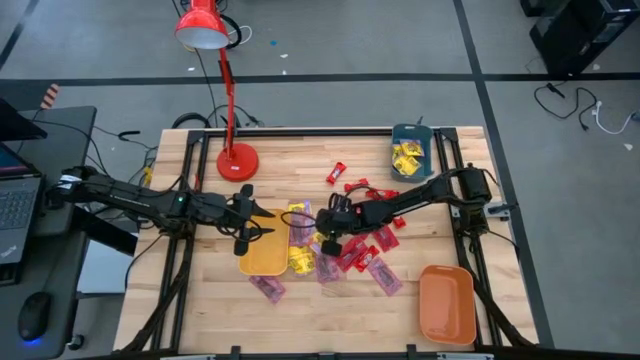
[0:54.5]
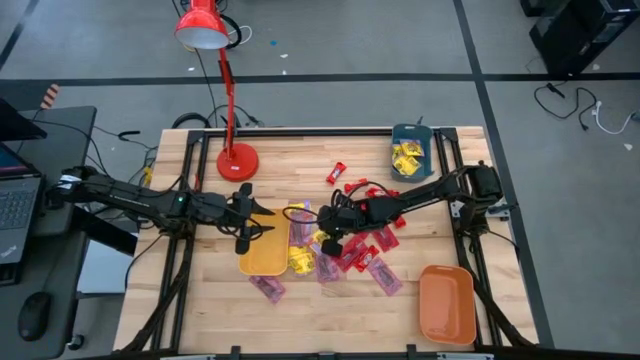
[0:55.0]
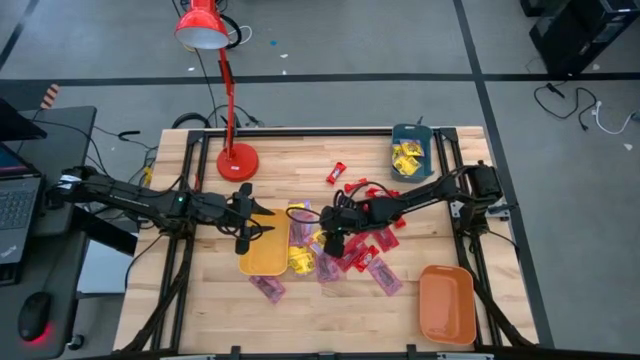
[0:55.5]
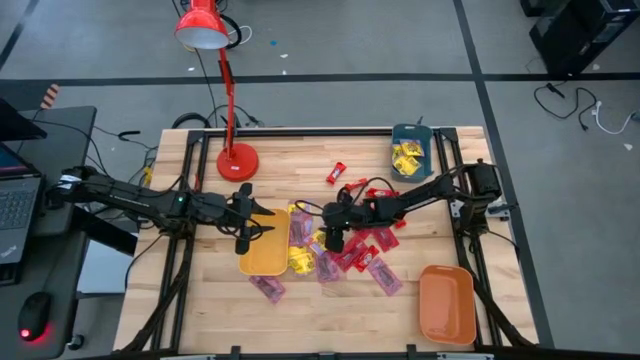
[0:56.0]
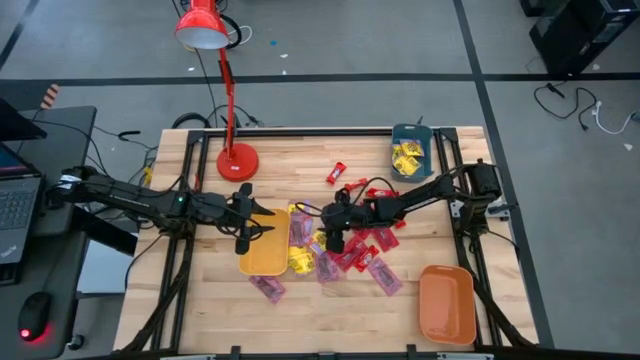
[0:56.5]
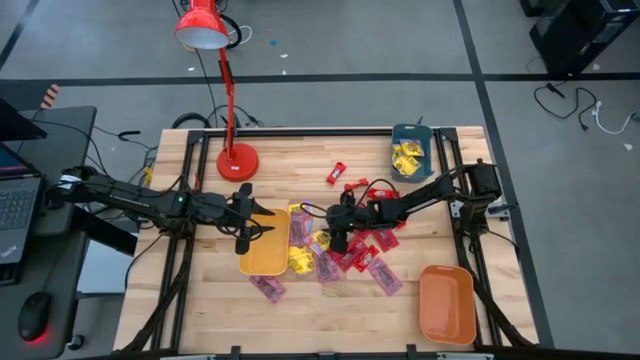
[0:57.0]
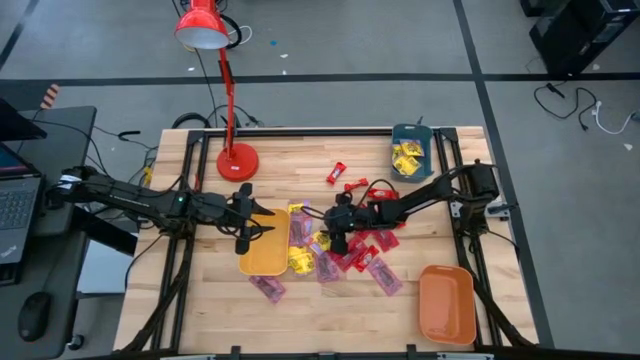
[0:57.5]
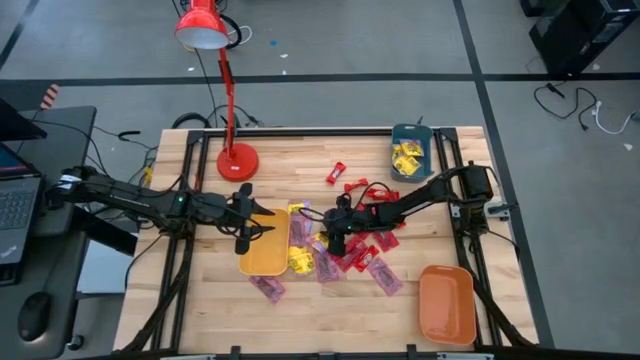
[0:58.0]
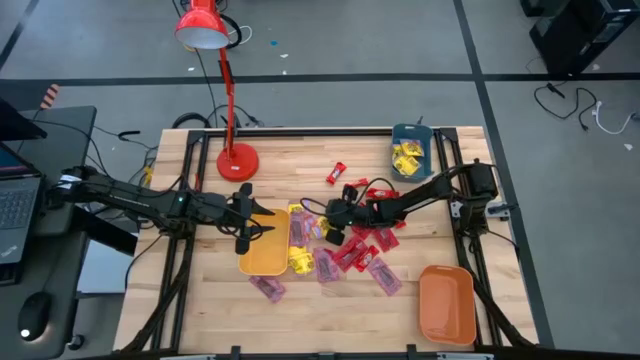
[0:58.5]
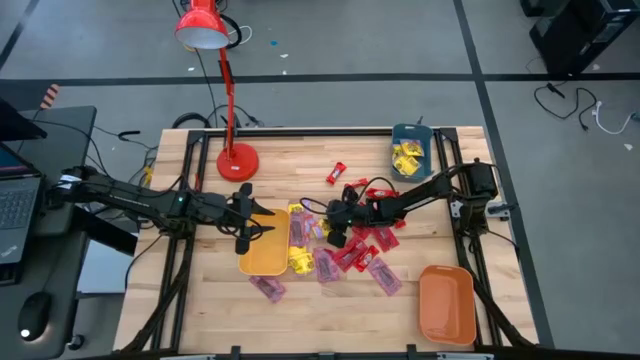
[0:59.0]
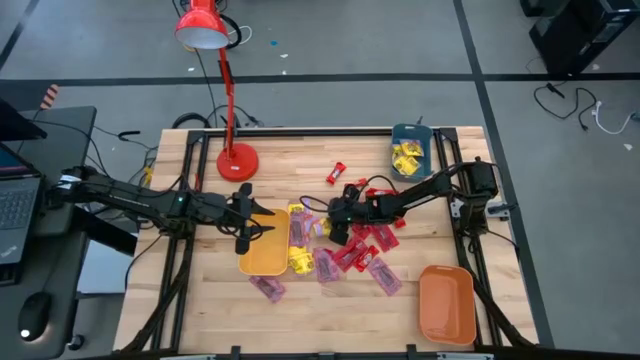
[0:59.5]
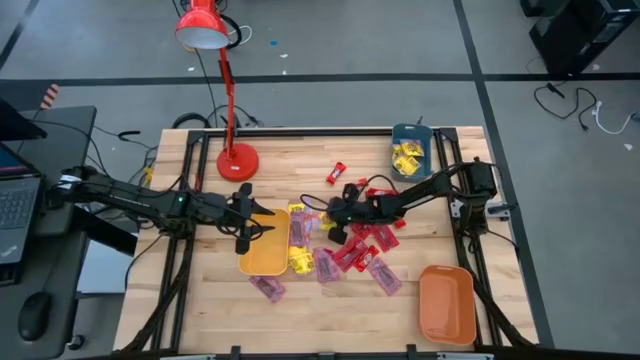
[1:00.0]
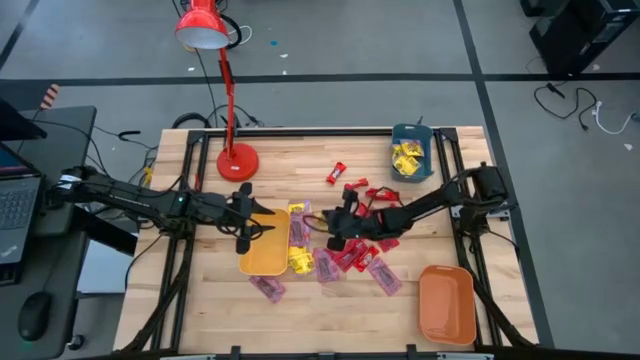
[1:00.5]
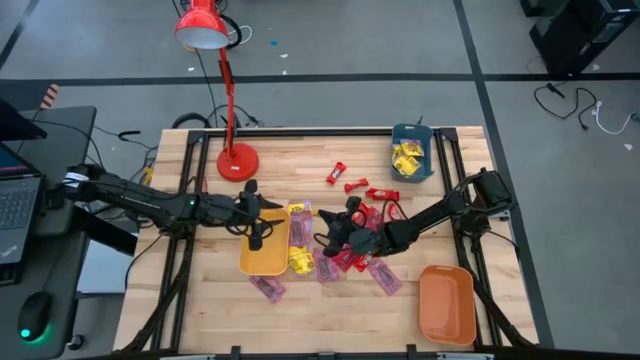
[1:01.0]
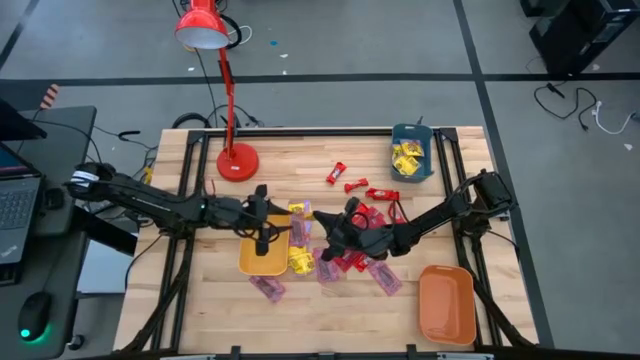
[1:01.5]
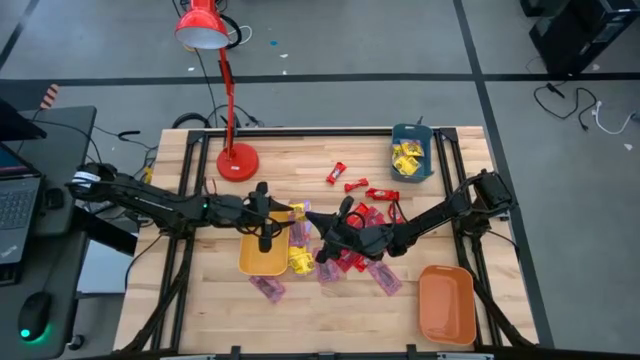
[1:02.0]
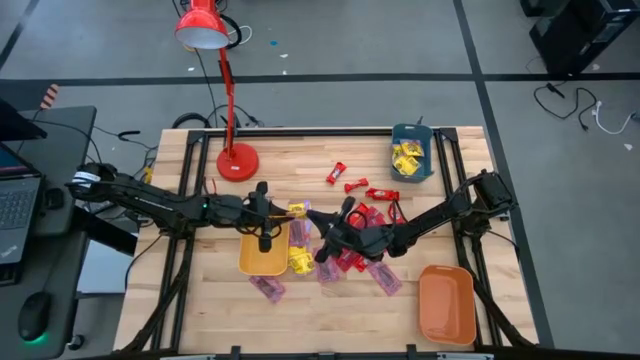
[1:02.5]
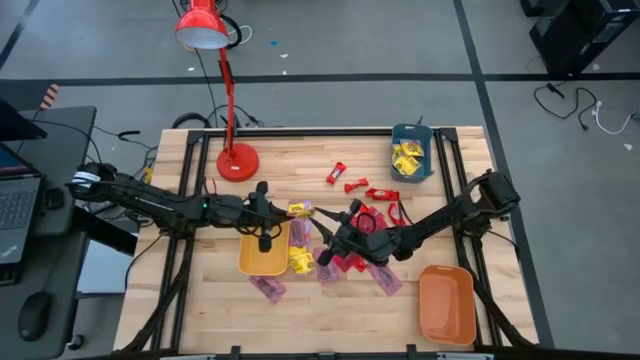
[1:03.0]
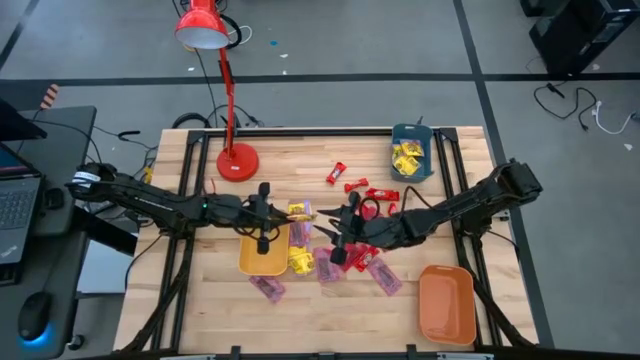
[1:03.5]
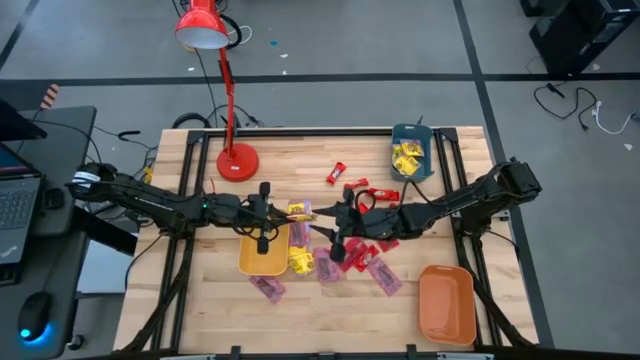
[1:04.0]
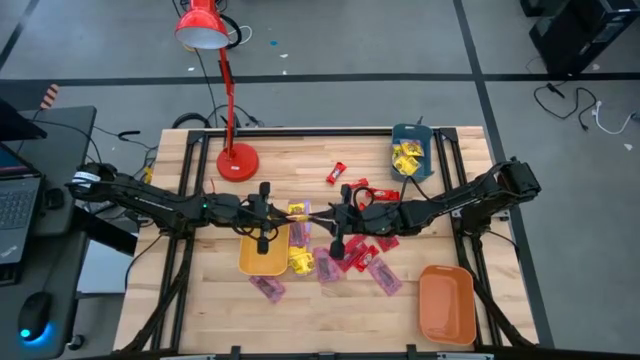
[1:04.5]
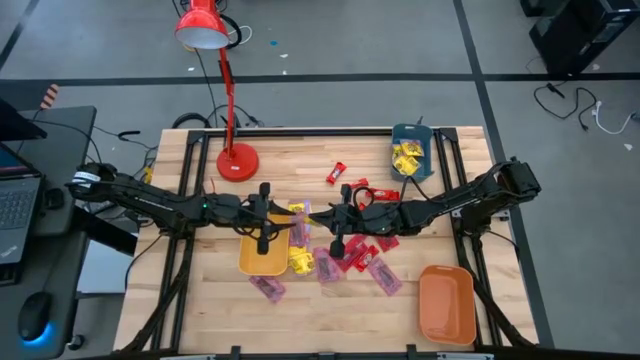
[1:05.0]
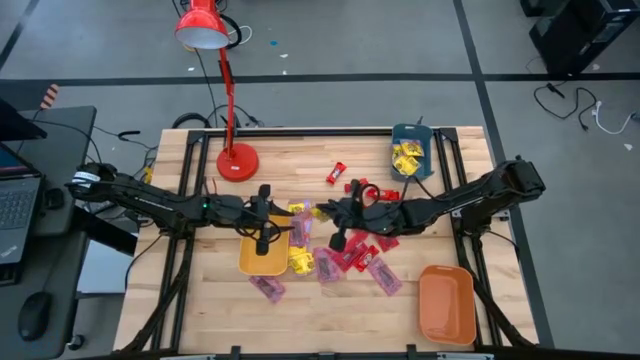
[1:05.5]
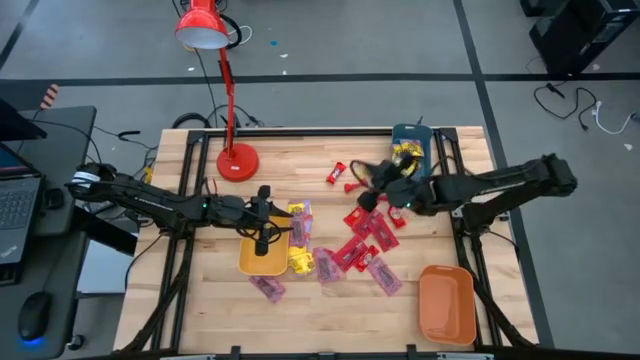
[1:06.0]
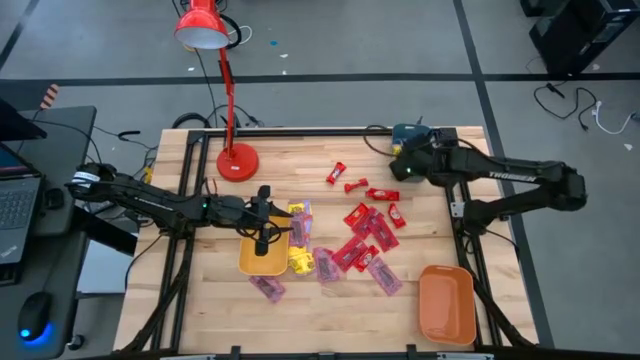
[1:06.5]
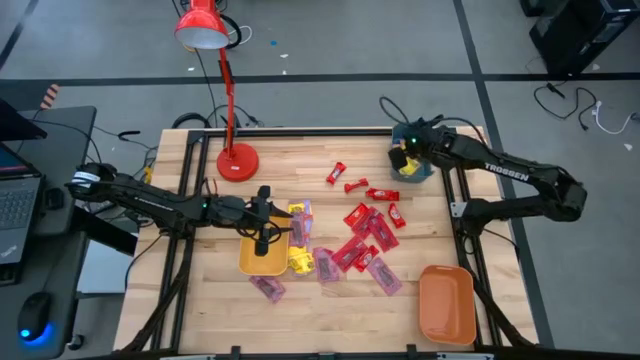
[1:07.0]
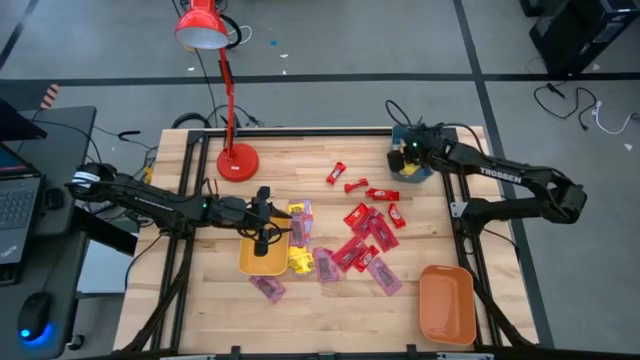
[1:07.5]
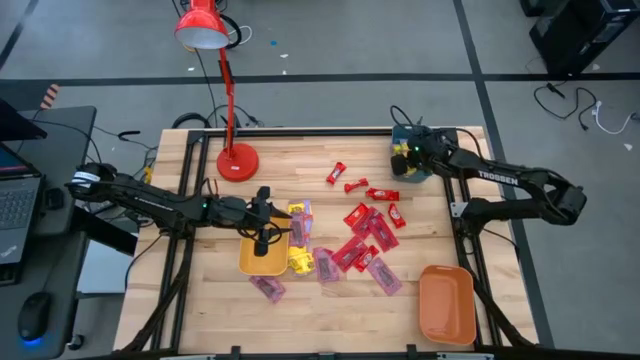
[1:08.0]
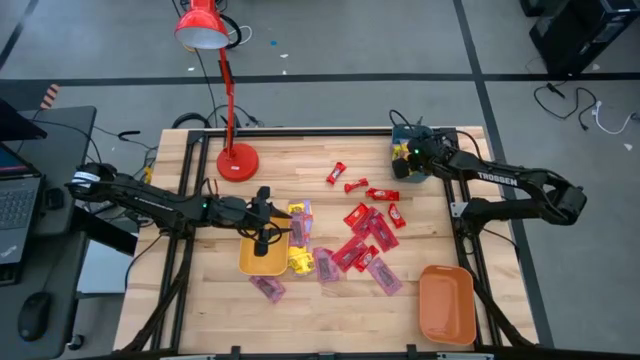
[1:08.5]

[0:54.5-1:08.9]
Task: Sort candy
Put the yellow candy pack into the blue bin

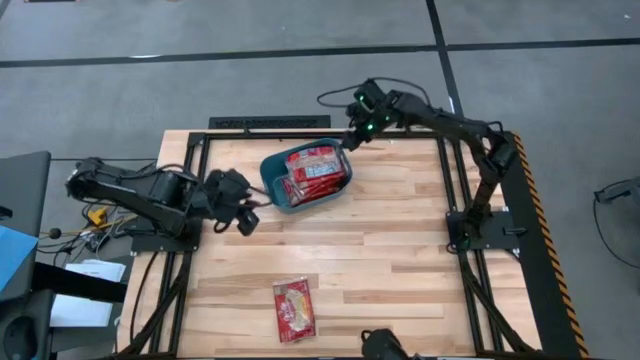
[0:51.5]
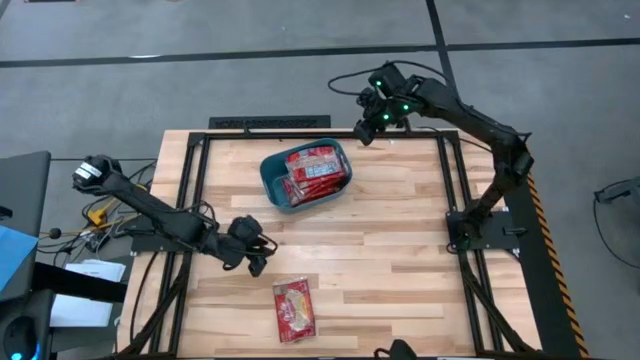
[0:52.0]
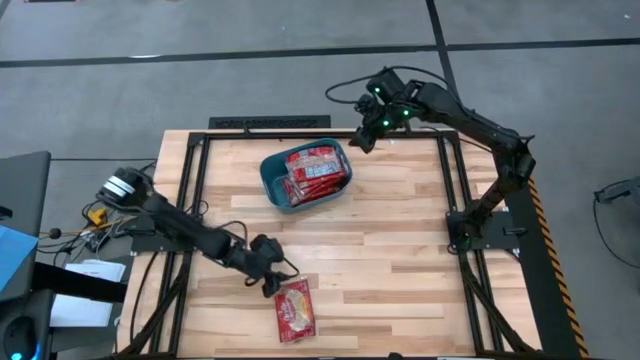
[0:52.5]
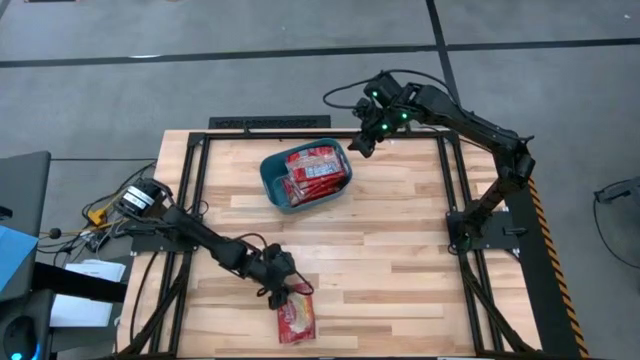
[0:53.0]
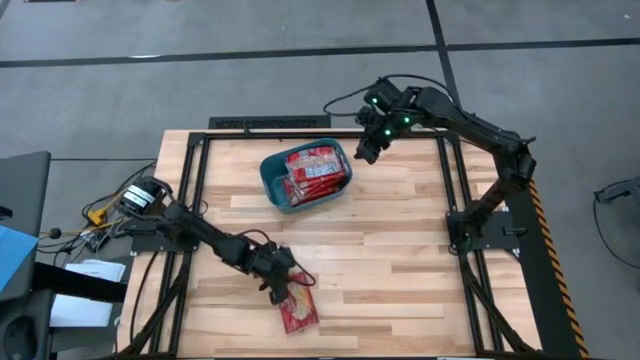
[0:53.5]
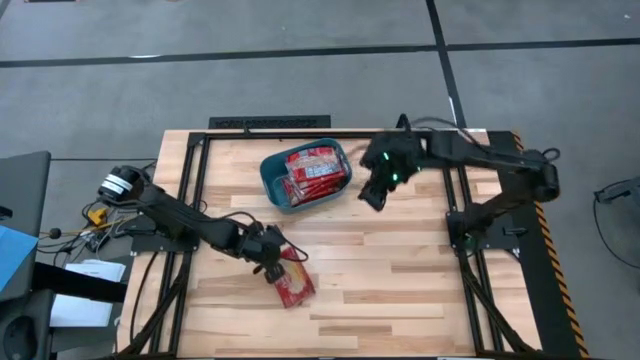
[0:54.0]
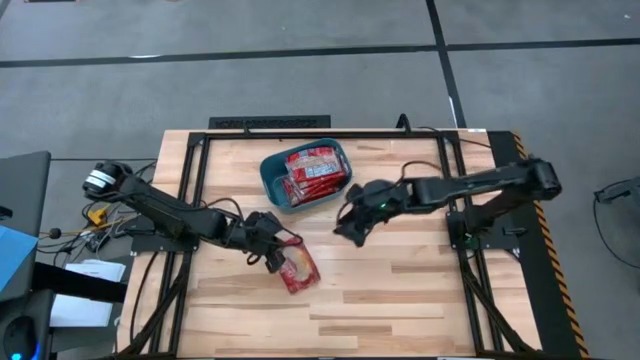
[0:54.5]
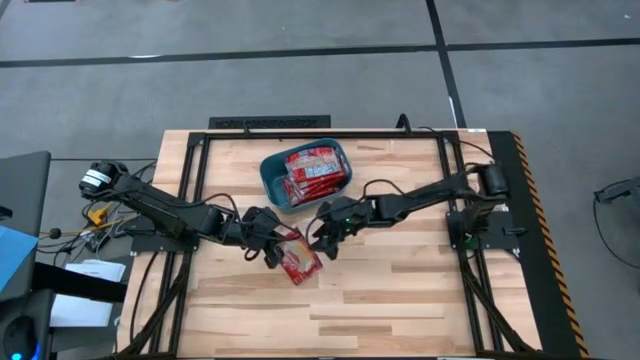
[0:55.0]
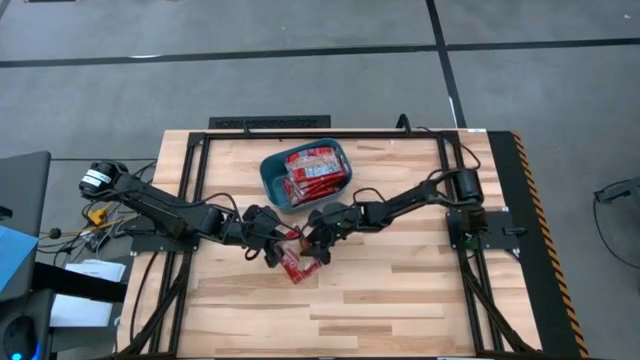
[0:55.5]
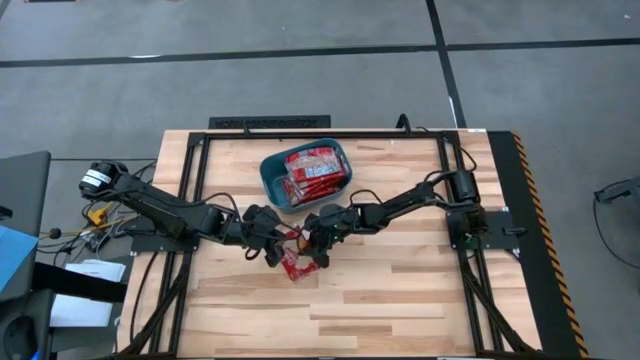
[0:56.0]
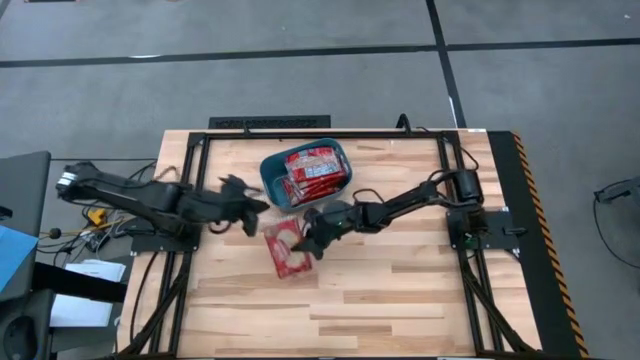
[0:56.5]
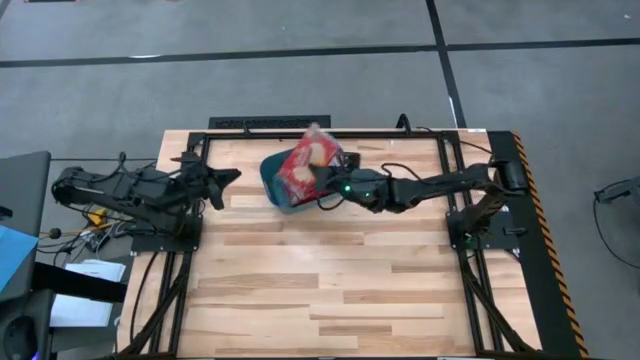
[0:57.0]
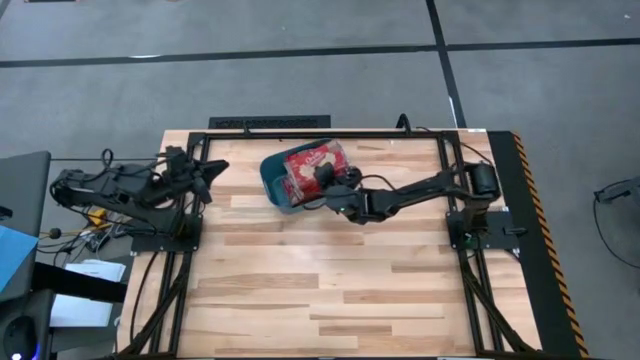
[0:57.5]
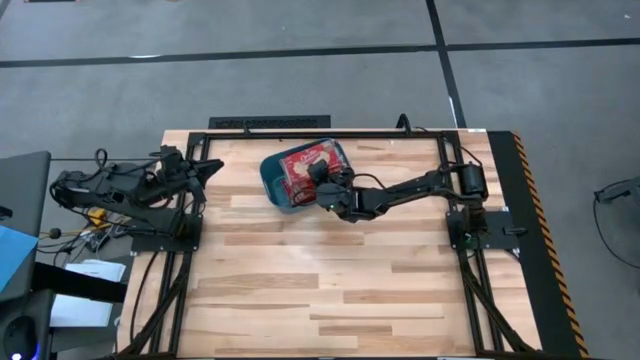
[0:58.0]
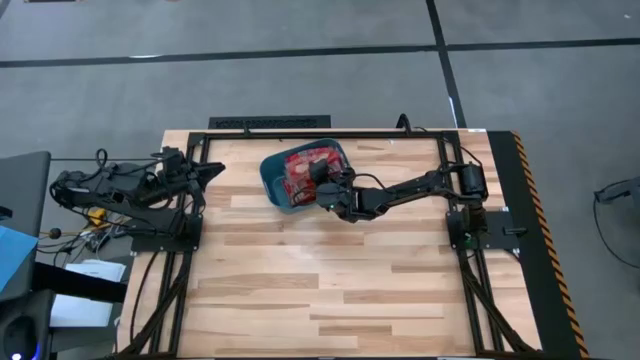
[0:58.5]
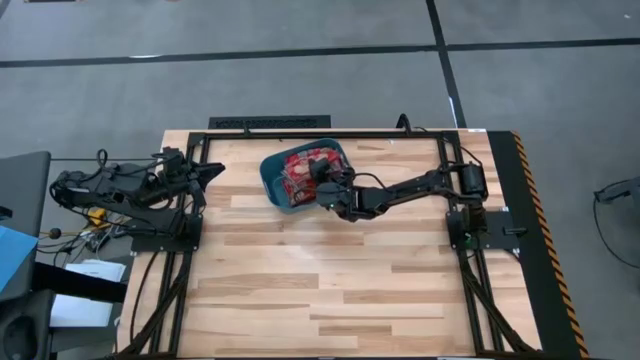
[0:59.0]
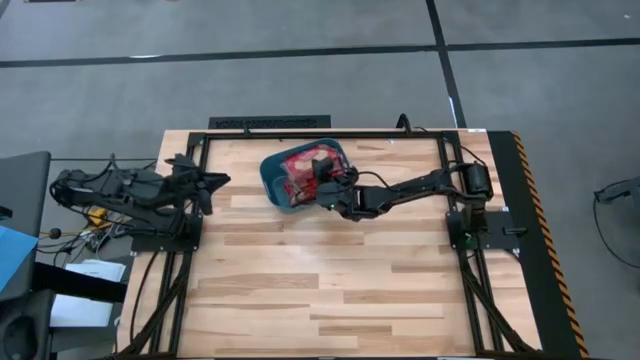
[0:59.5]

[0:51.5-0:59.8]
Task: Sort popcorn bags into baskets
Put the red popcorn bag into the blue bin
